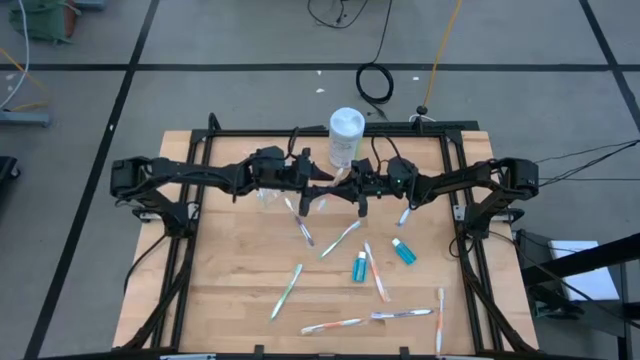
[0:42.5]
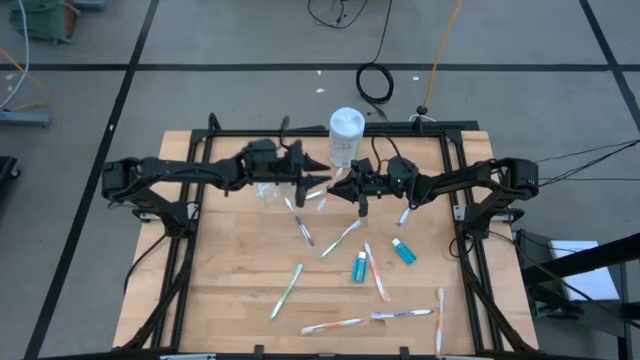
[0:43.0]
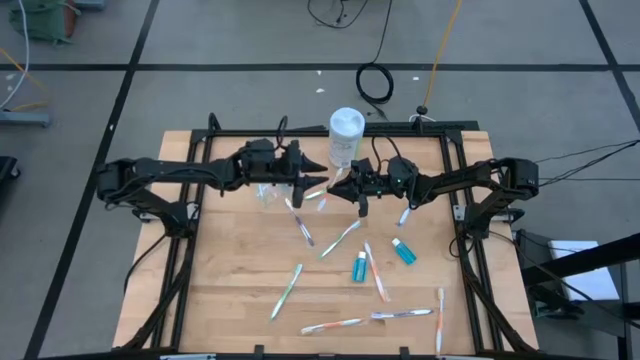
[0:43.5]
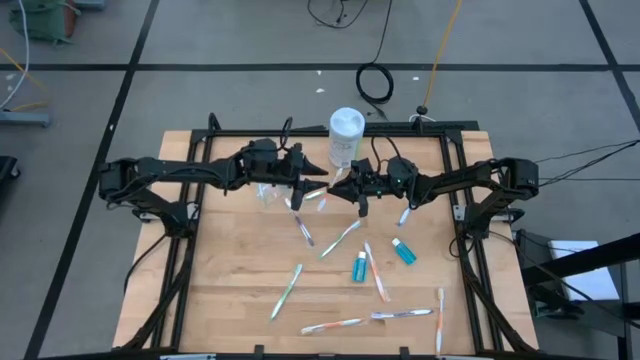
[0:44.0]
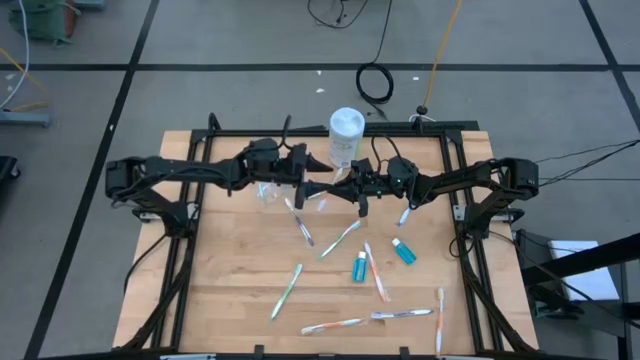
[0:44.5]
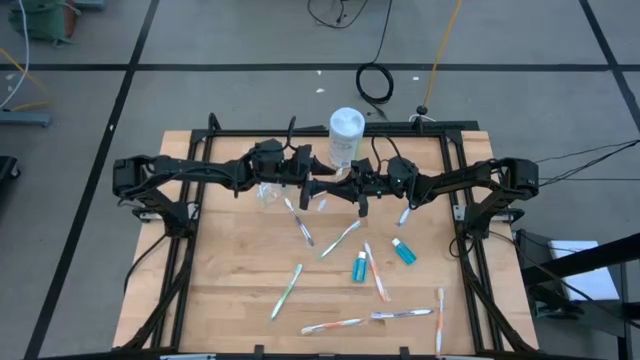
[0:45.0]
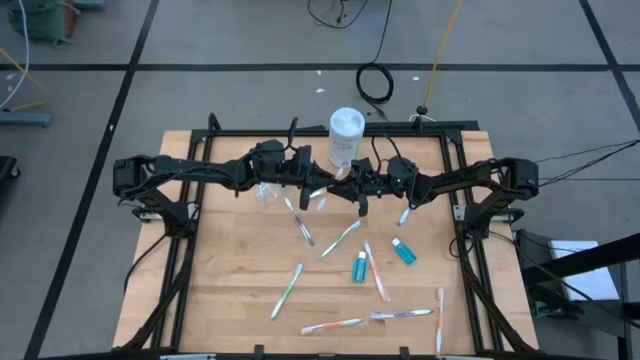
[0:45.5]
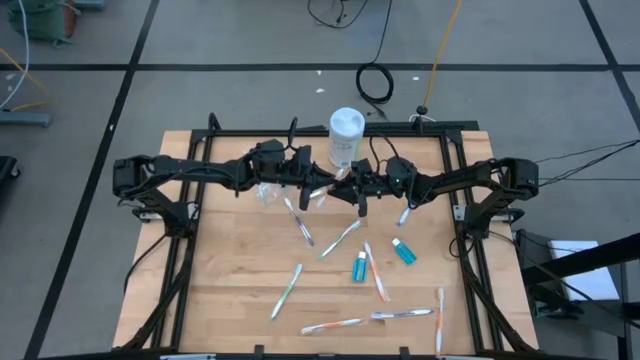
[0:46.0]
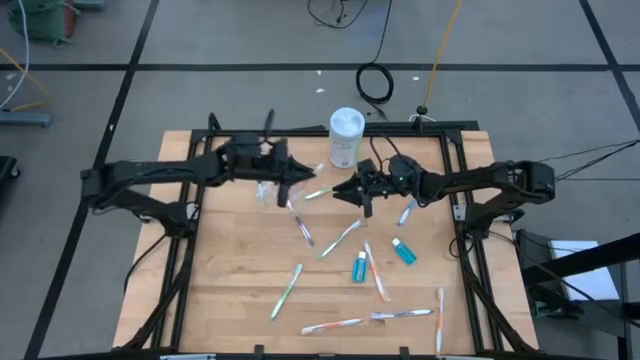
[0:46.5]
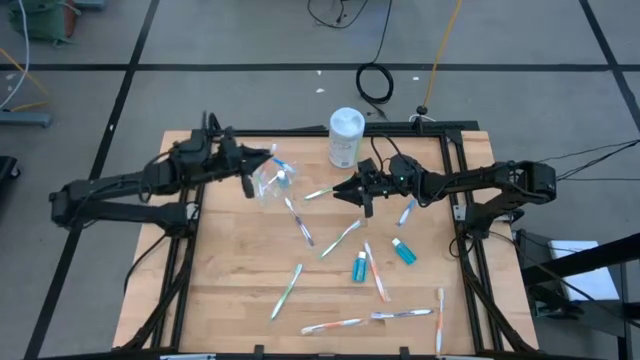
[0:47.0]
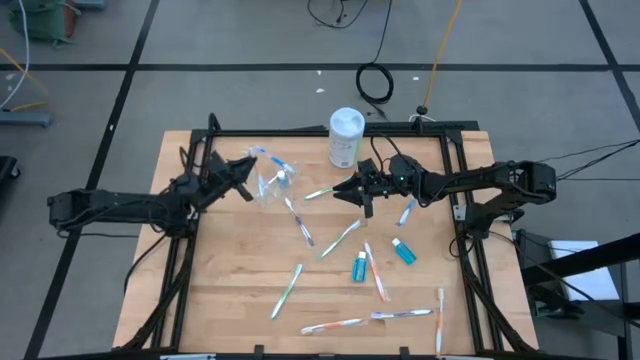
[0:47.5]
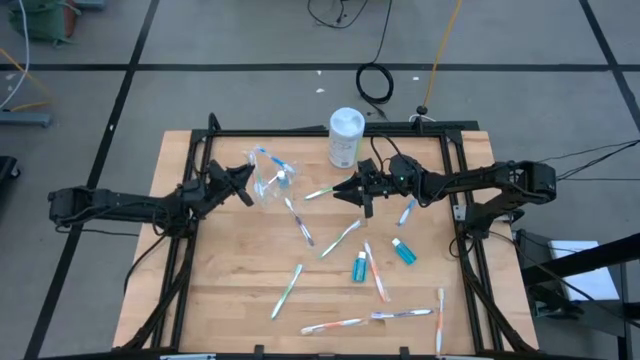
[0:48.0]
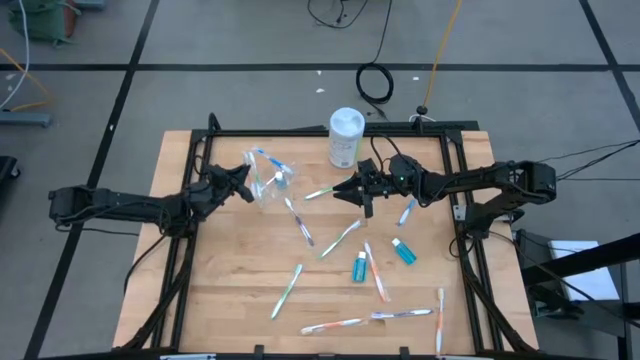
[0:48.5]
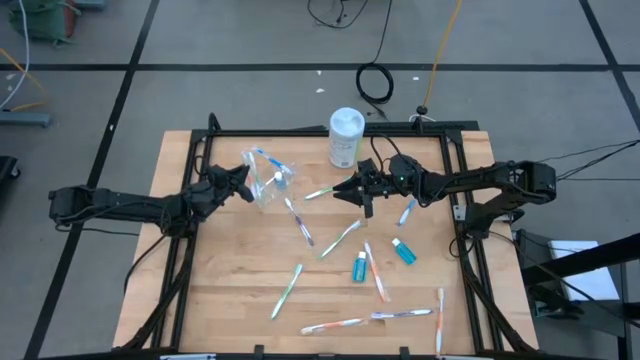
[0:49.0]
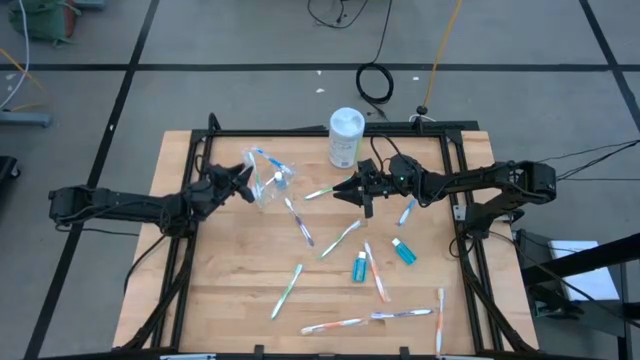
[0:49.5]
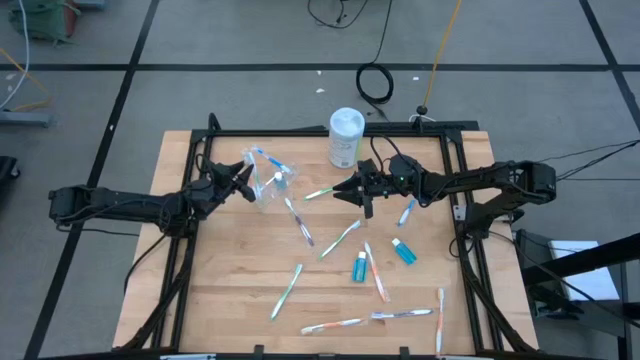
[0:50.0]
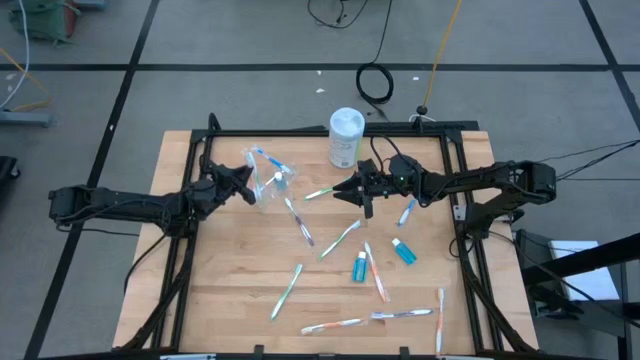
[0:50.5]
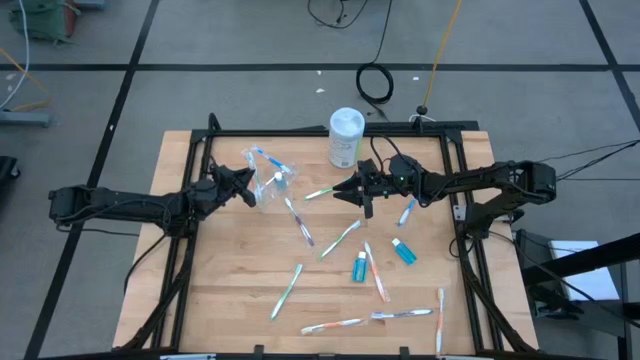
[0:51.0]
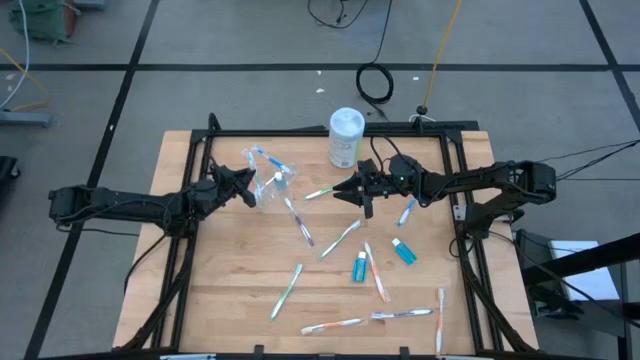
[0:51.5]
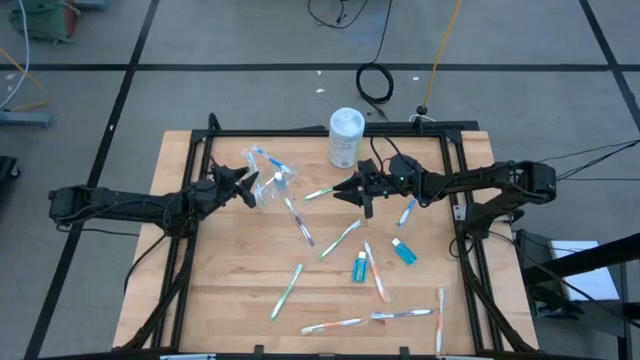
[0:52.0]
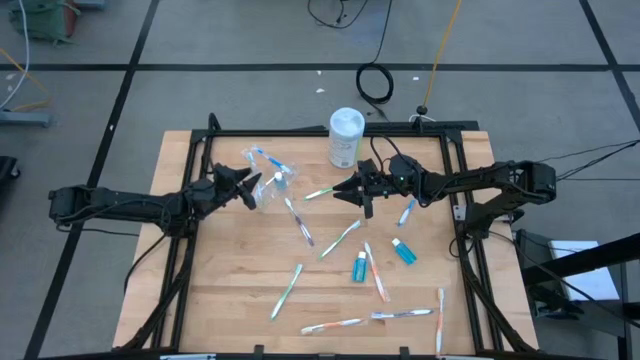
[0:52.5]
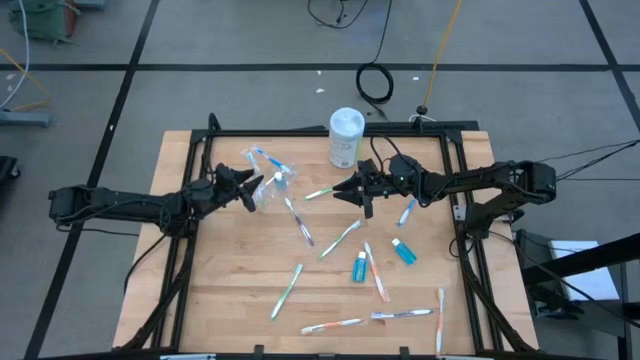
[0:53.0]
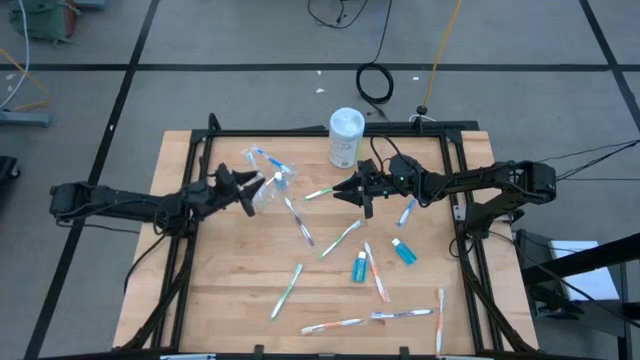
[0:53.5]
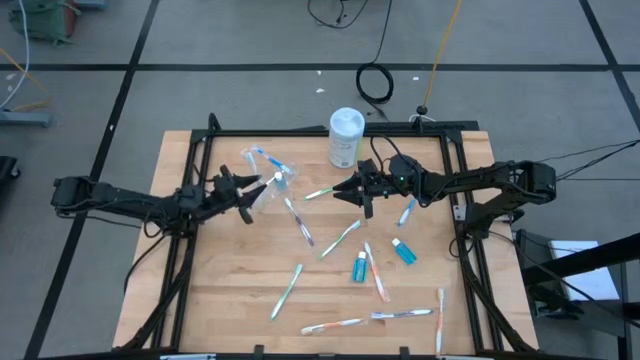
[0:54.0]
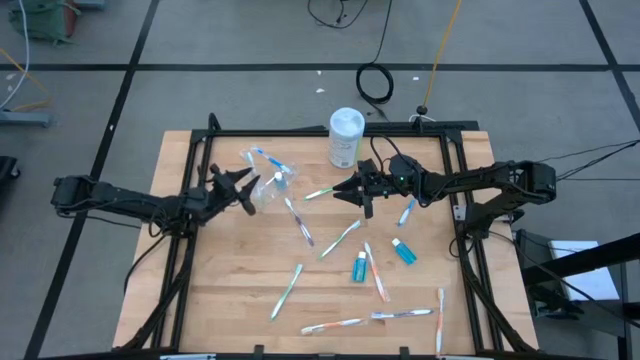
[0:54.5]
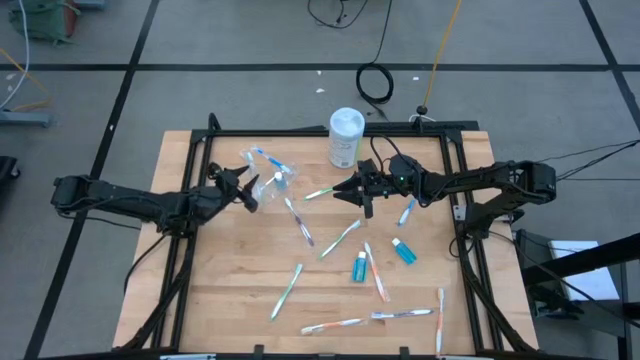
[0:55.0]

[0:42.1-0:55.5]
Task: Pick & Place toothbrushing station
Put the orange toothbrush into the left of the transparent organizer

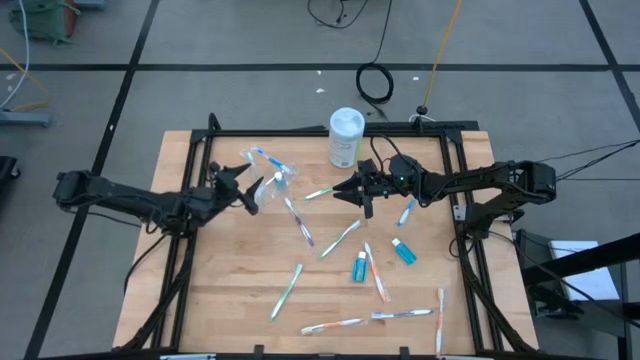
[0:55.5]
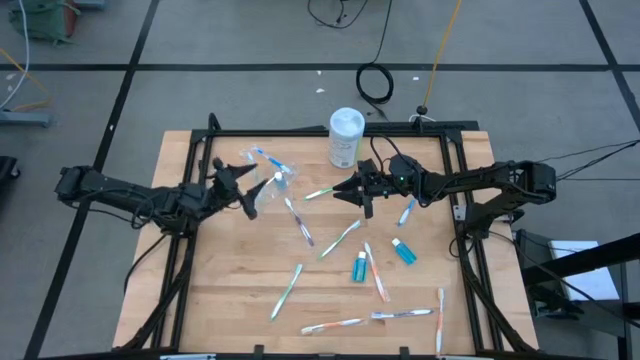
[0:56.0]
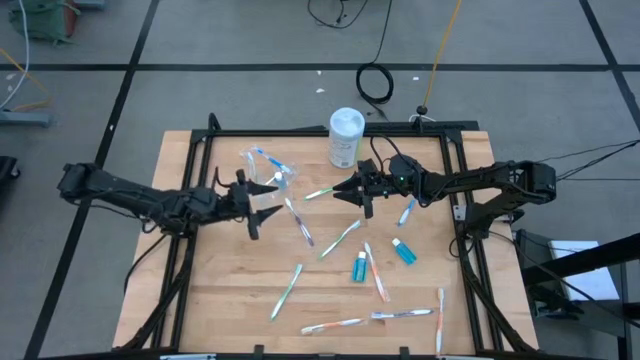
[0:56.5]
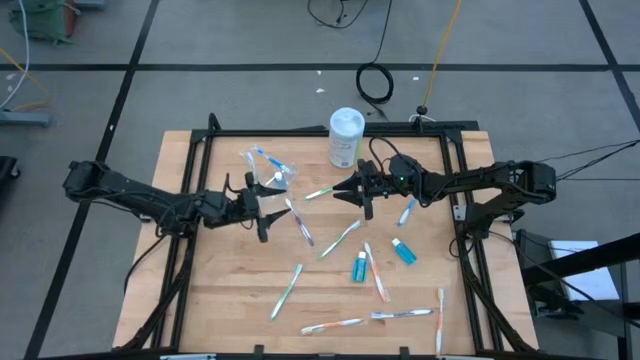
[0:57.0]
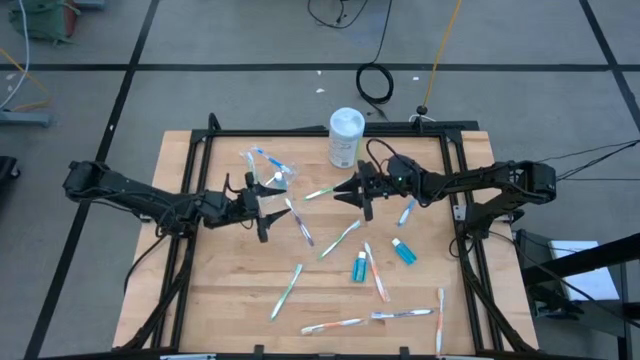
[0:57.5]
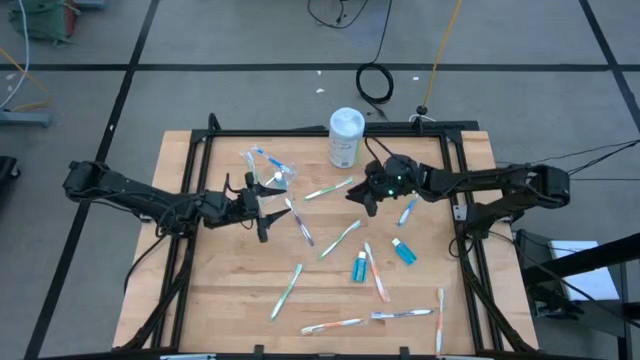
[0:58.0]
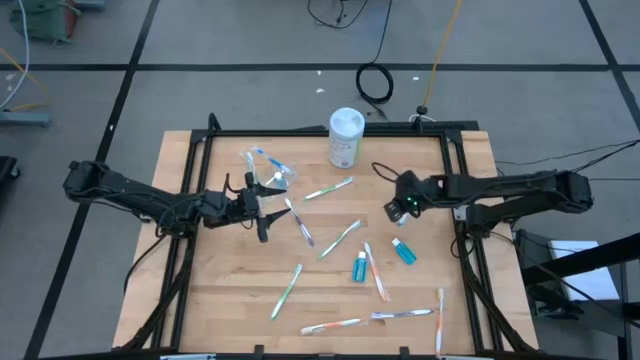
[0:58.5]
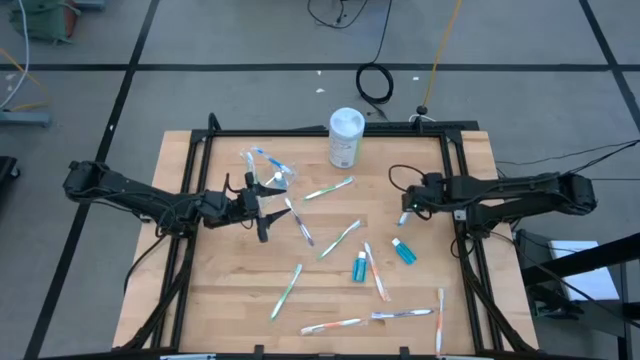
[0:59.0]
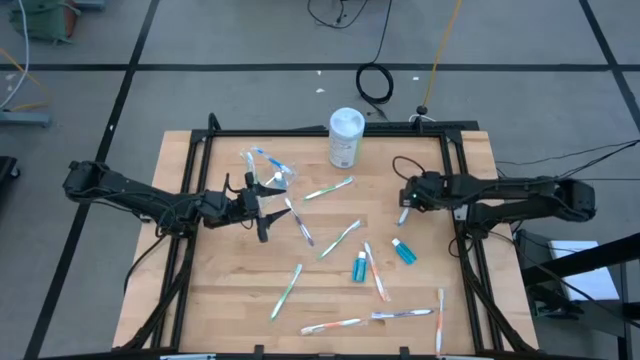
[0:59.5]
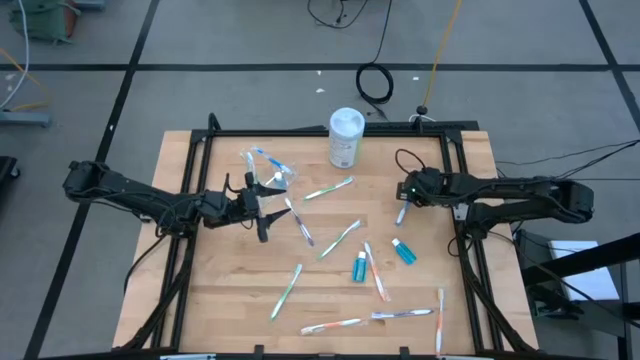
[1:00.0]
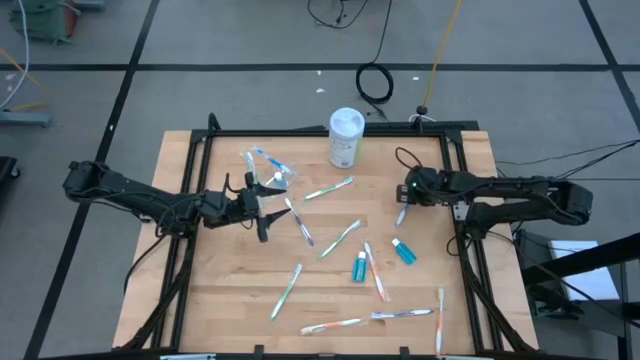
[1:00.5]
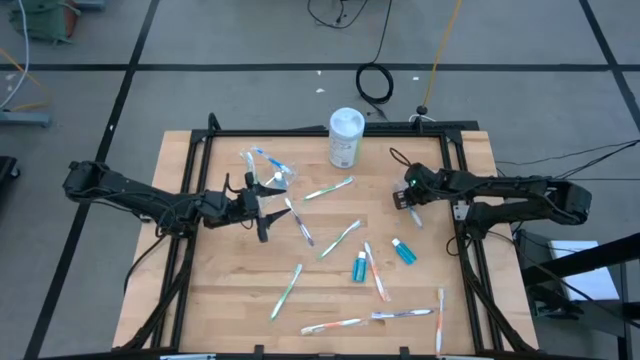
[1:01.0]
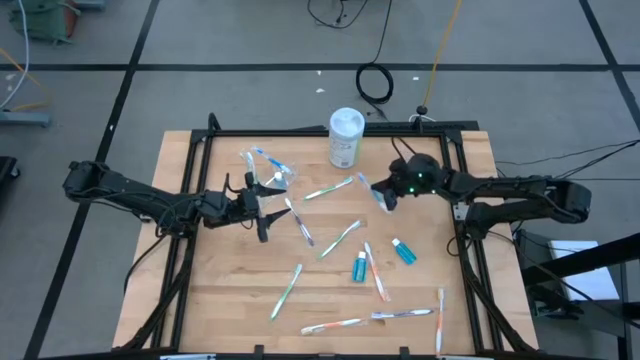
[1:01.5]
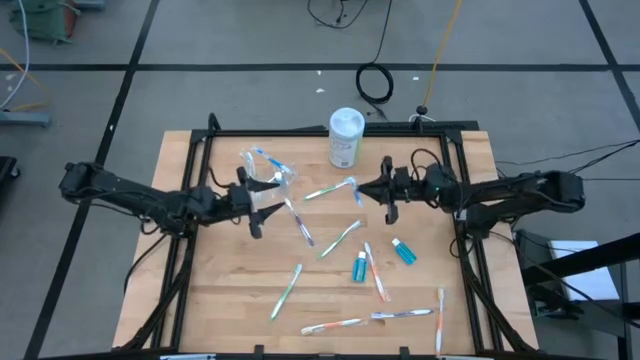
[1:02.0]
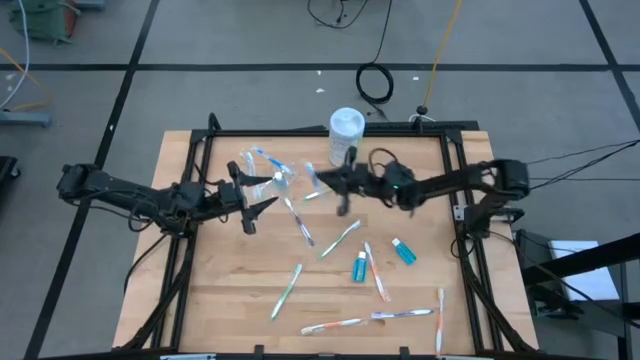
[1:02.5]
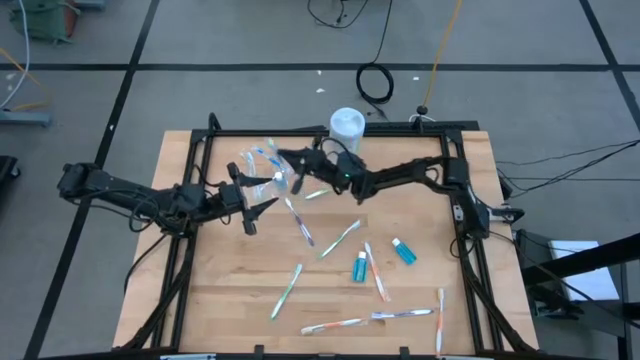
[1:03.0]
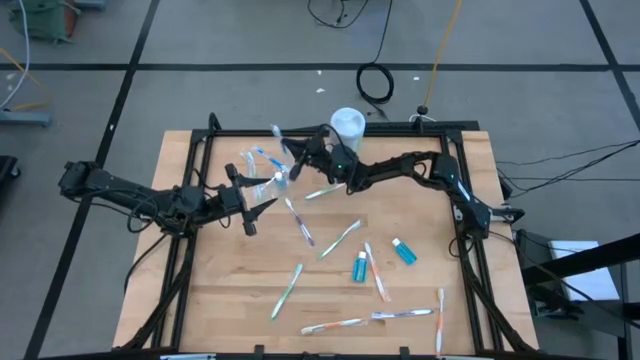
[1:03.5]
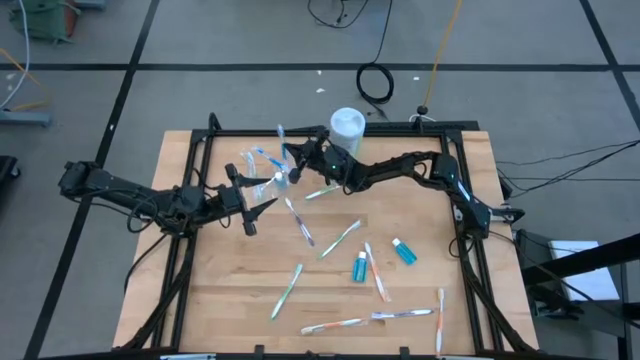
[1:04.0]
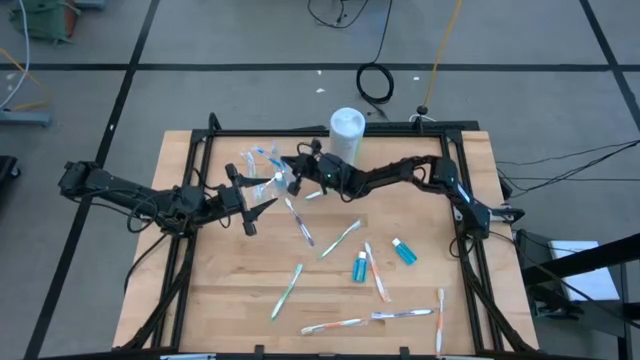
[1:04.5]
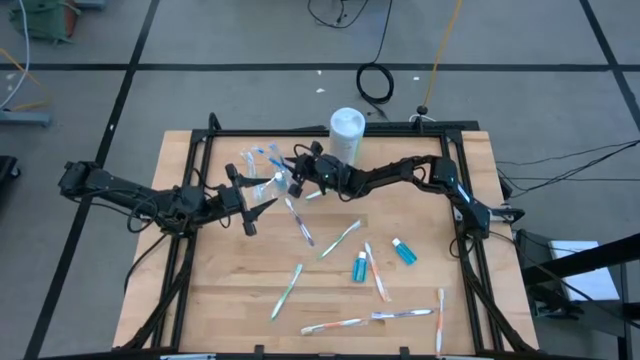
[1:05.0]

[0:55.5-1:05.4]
Put the blue toothbrush into the right of the transparent organizer
